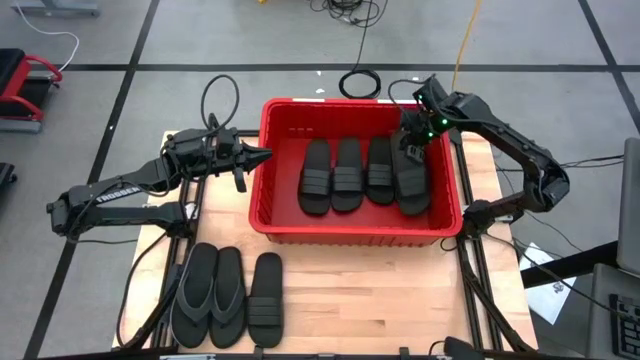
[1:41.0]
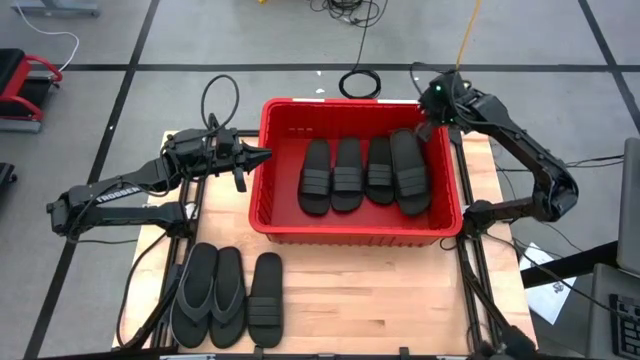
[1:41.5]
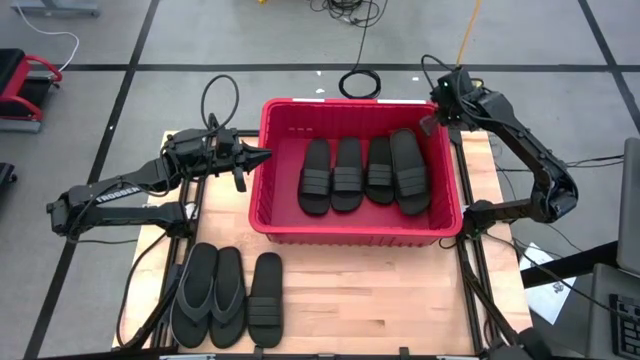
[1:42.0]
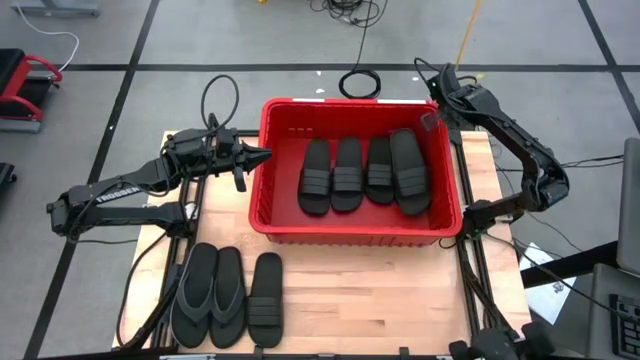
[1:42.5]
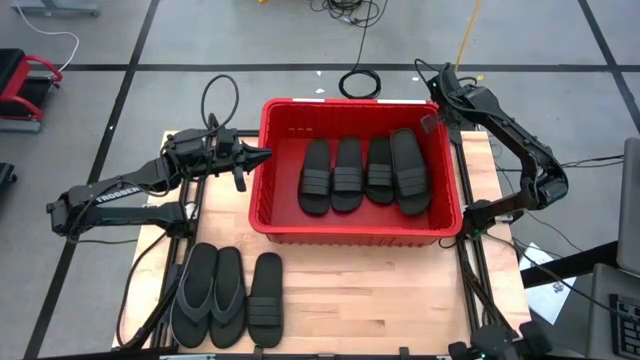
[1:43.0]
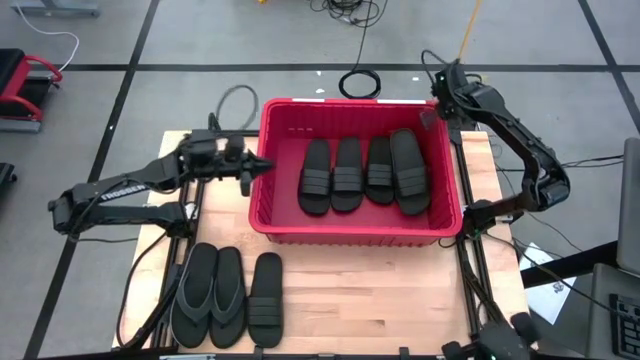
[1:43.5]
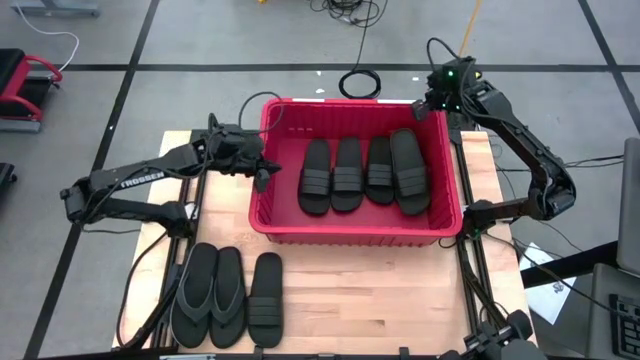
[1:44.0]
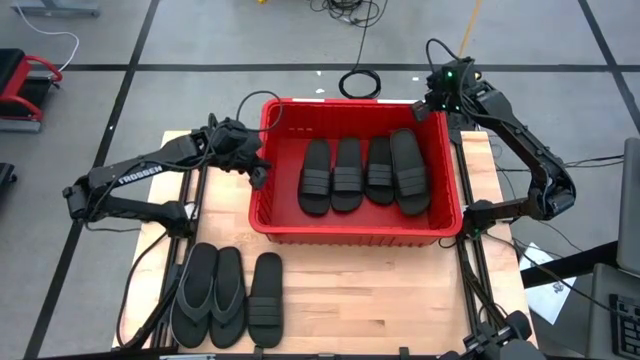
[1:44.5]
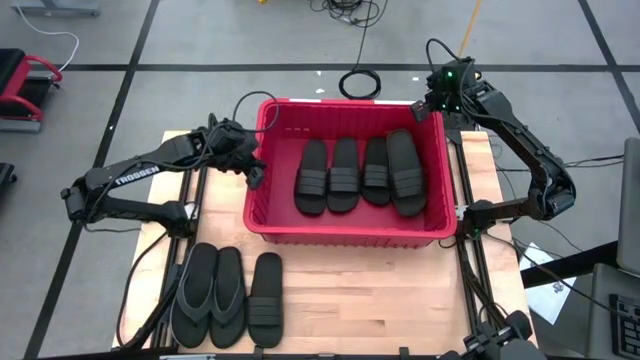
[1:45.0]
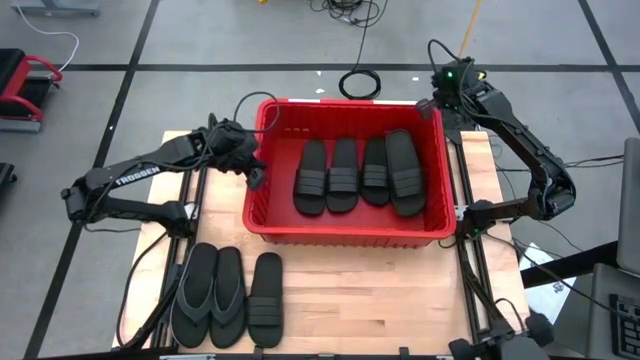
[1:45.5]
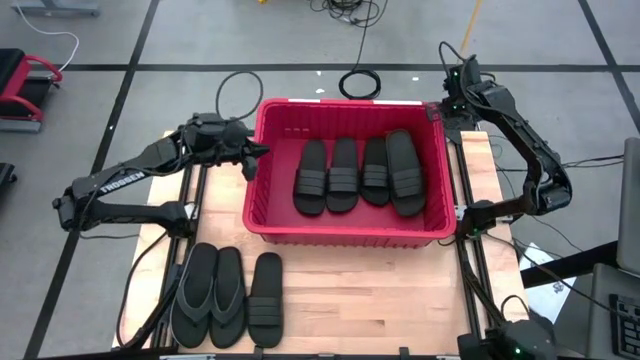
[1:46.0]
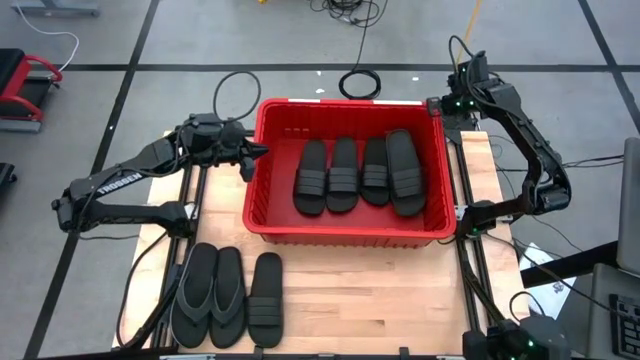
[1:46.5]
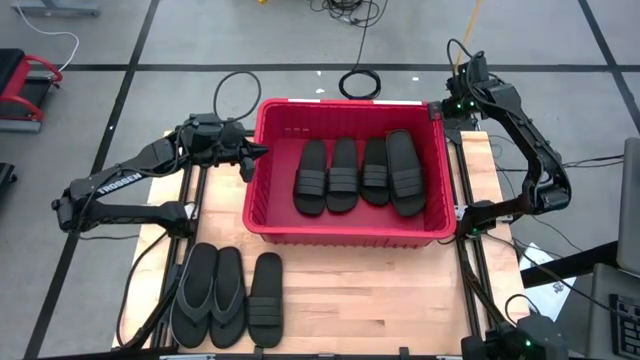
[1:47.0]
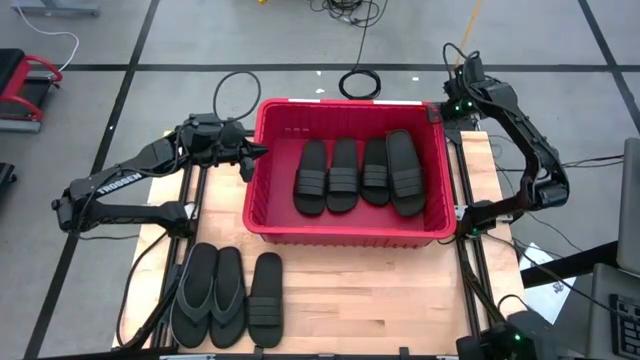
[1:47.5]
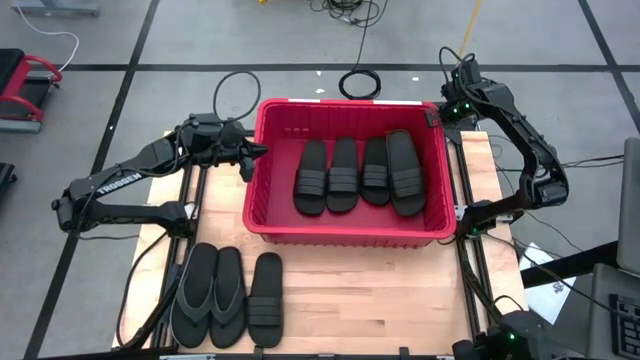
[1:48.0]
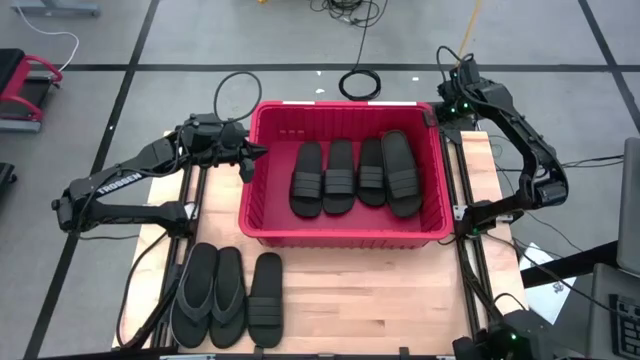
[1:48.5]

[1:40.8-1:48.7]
Task: Pick and place slides into bin
Adjust the red bin

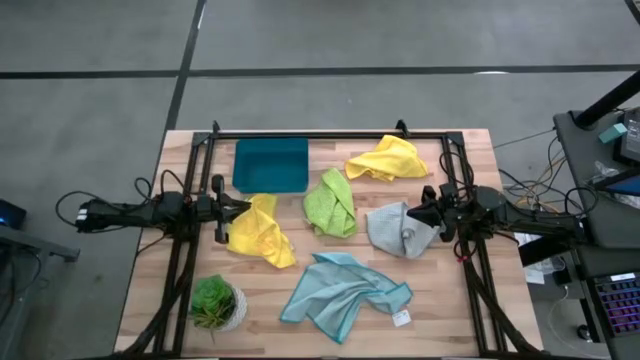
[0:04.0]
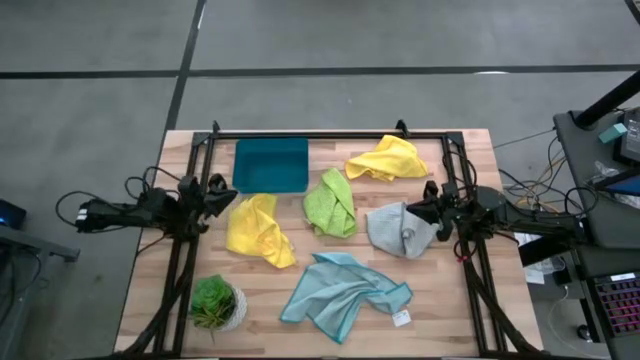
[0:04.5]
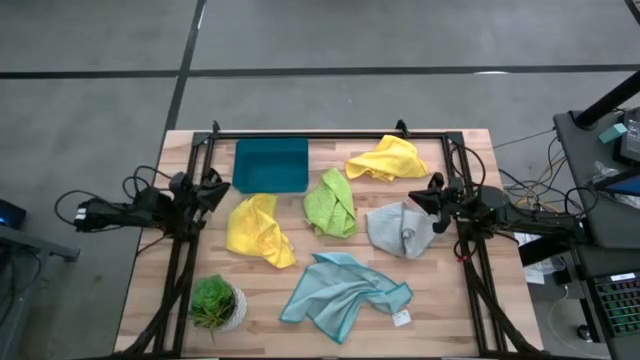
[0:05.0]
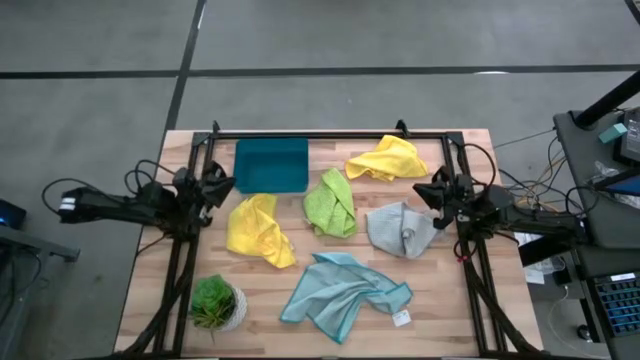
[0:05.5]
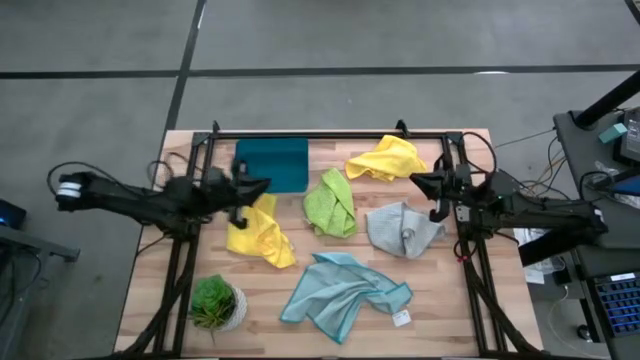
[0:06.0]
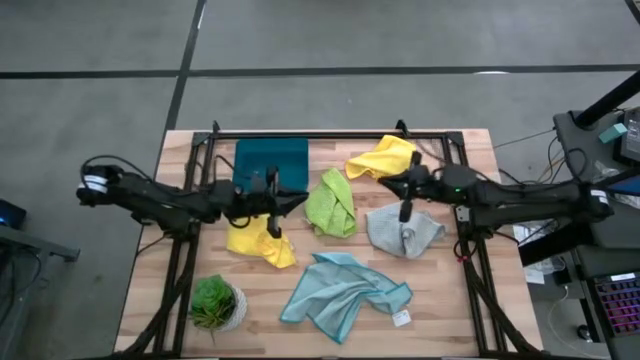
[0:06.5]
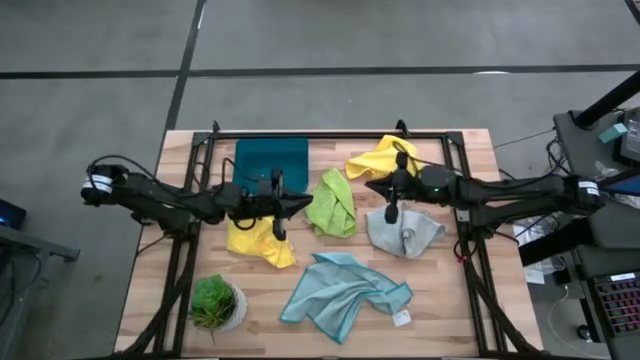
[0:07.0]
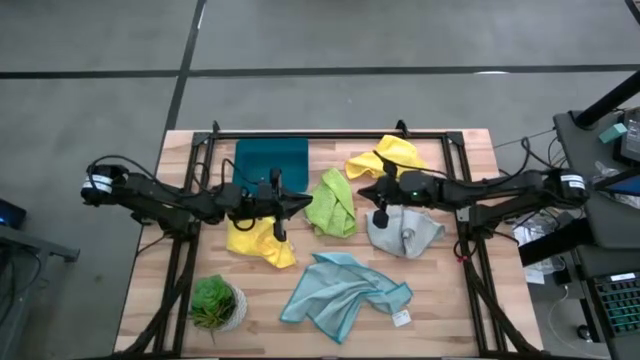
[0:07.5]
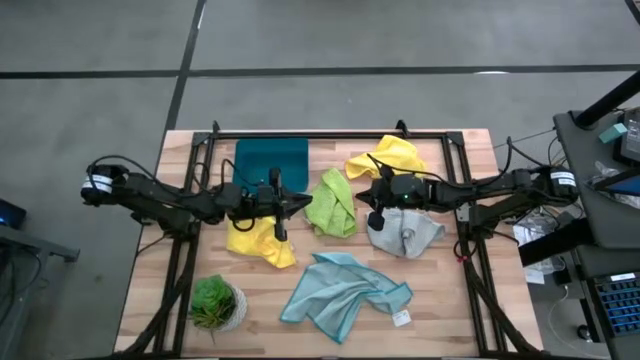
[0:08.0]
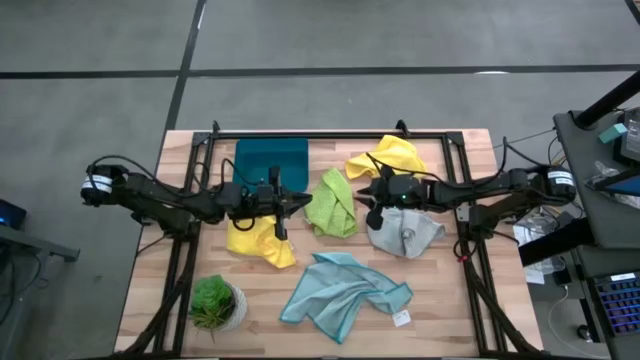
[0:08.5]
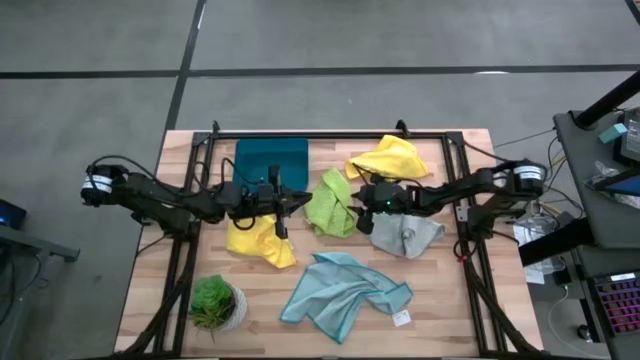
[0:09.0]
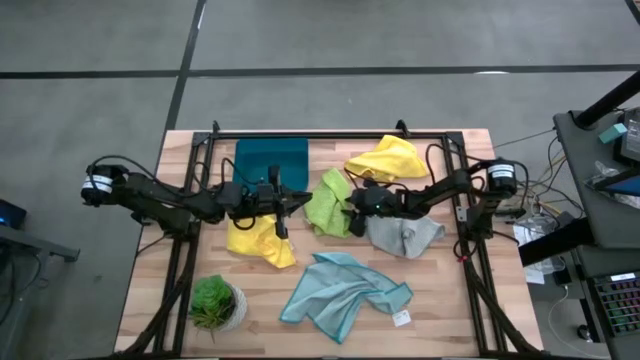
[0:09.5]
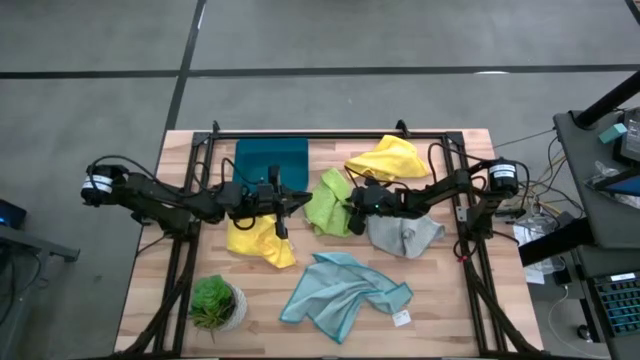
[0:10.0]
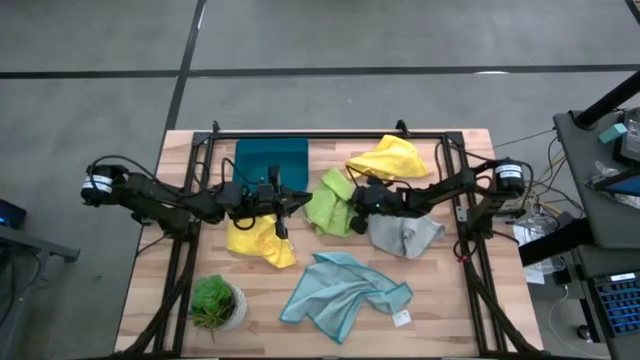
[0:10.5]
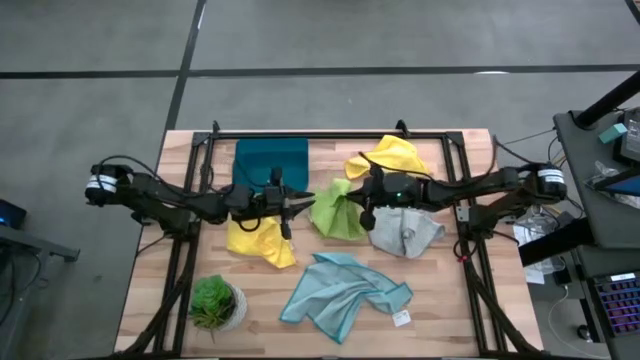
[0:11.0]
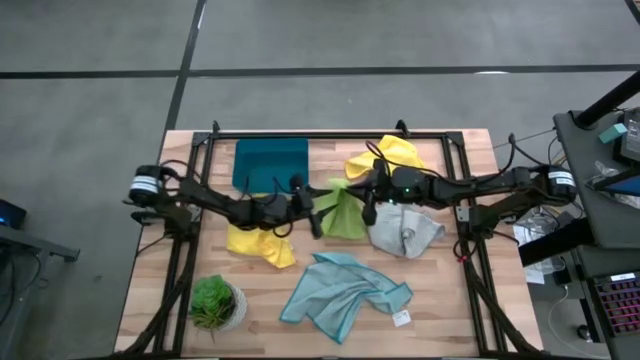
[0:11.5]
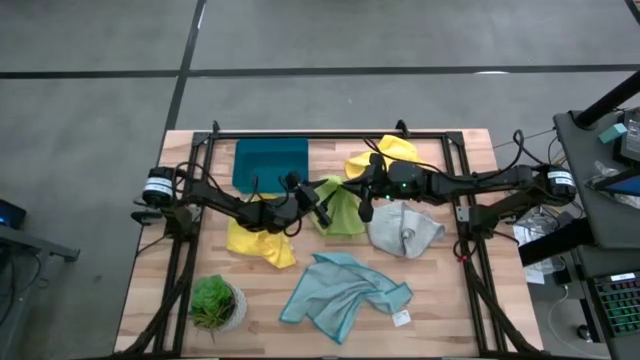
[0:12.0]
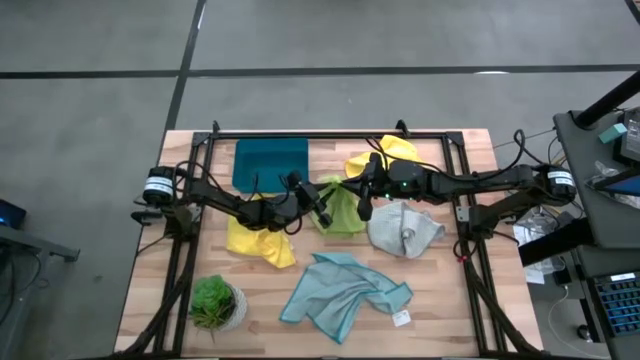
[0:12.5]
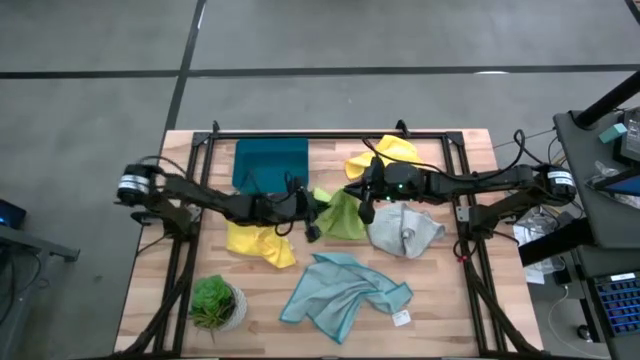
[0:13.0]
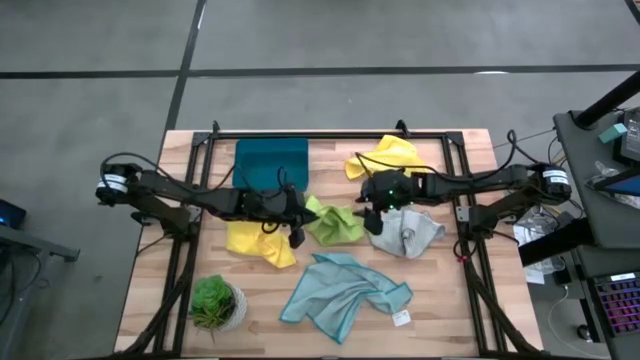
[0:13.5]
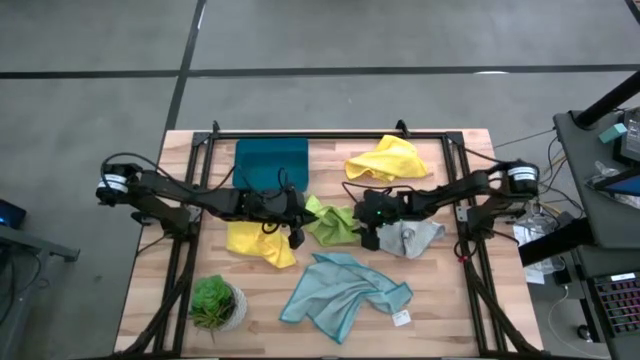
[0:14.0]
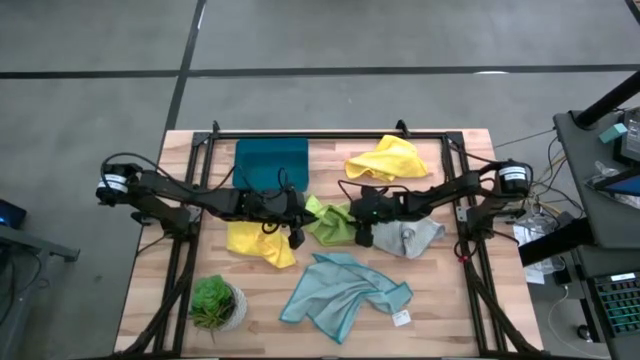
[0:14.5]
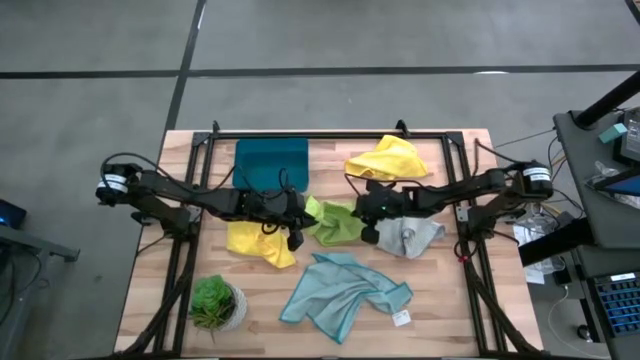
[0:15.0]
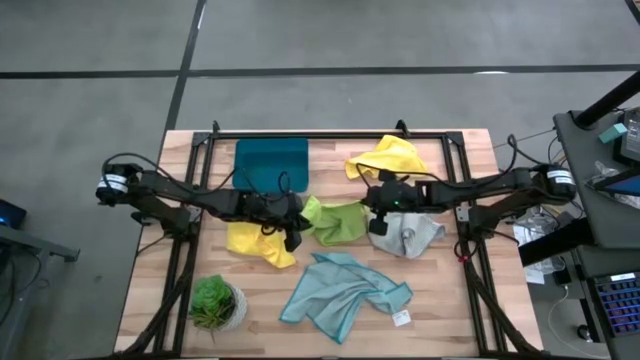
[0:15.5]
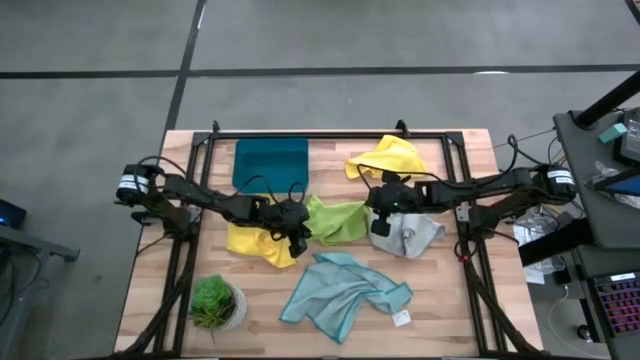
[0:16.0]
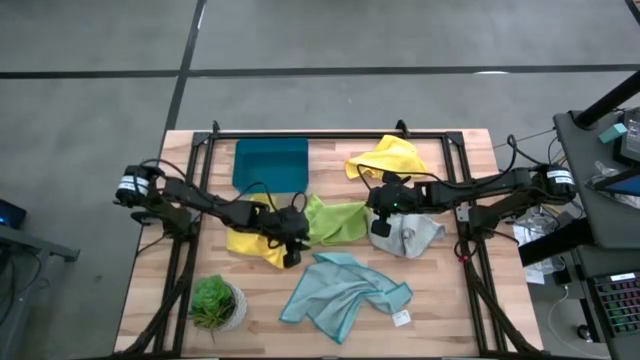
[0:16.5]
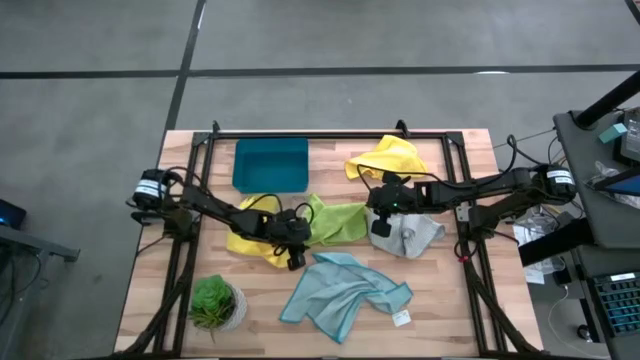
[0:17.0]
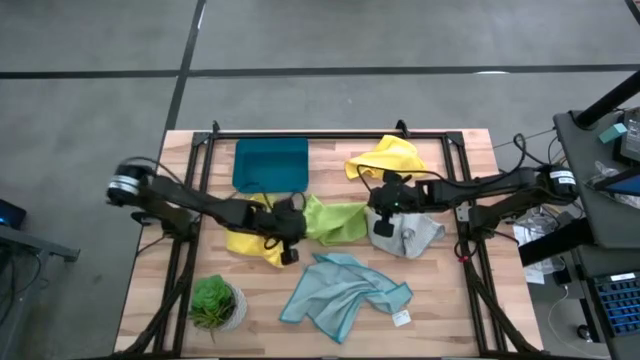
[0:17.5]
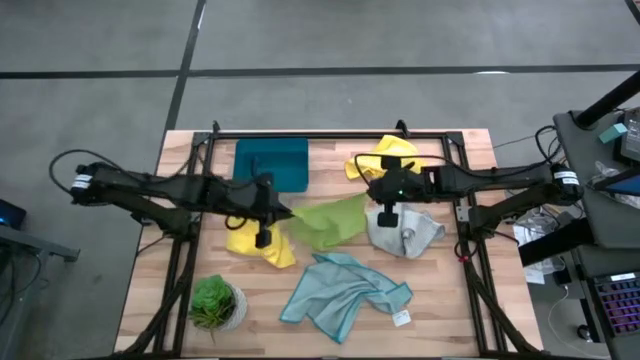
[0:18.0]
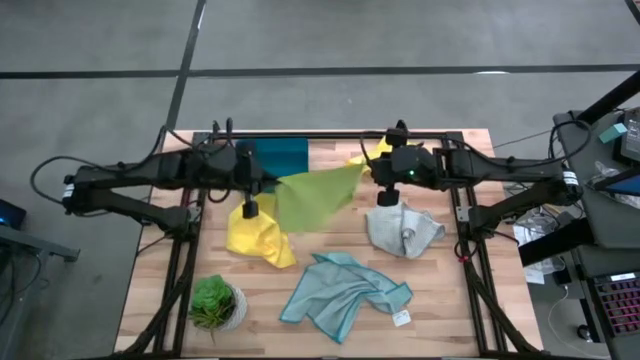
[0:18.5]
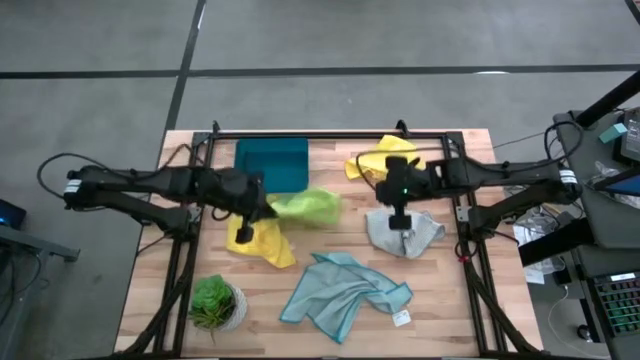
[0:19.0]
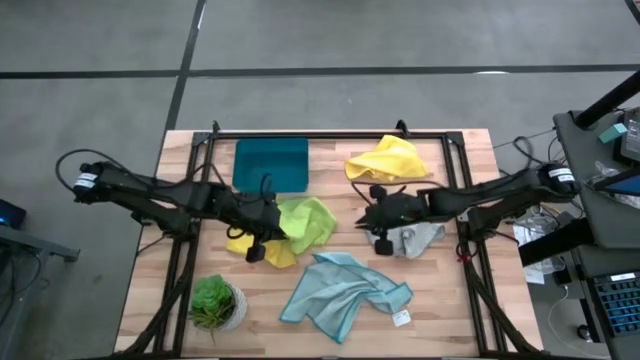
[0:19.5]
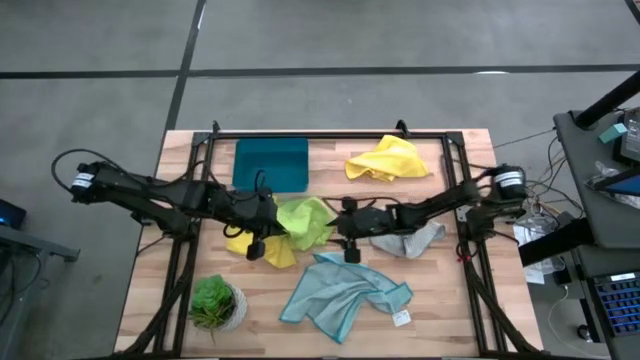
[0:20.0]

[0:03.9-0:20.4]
Task: Fold microfiber towels
Fold the green microfiber towel
